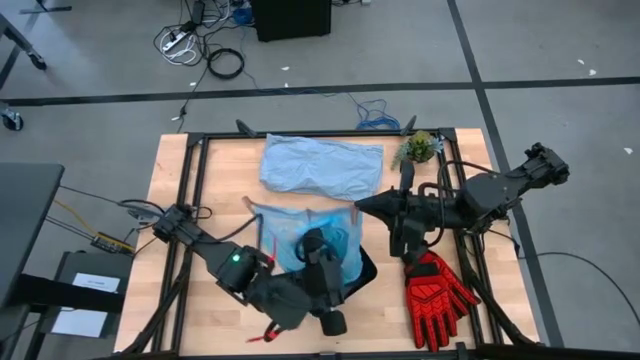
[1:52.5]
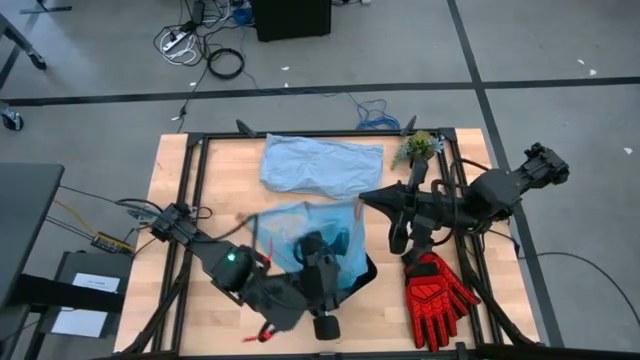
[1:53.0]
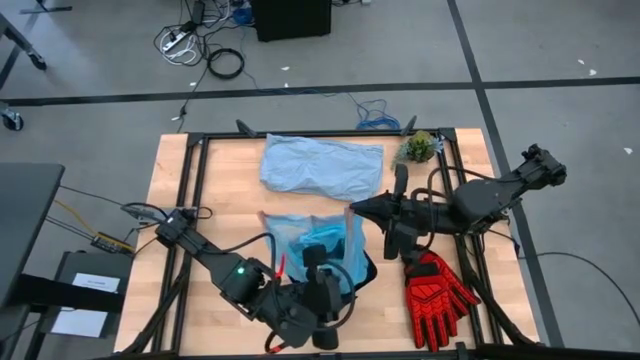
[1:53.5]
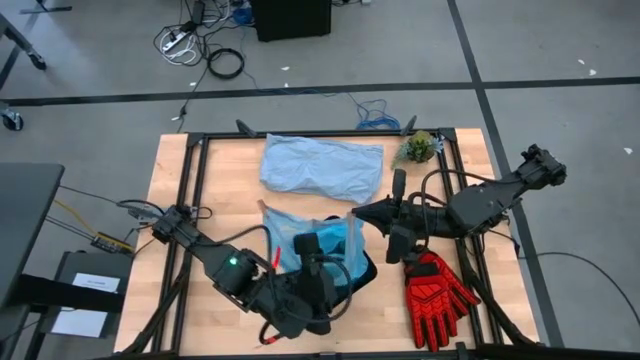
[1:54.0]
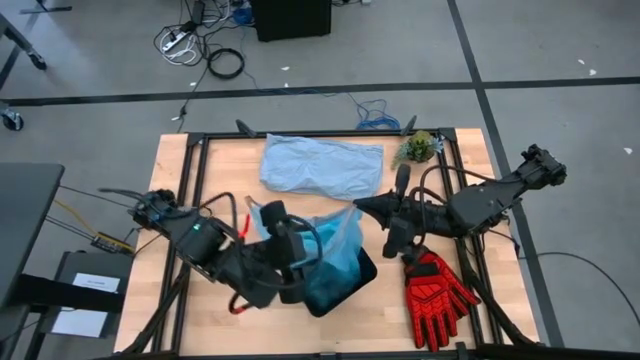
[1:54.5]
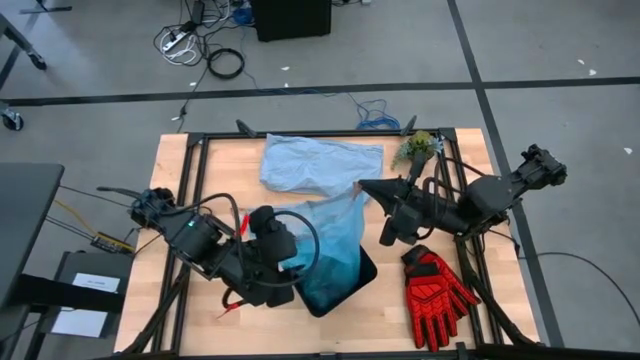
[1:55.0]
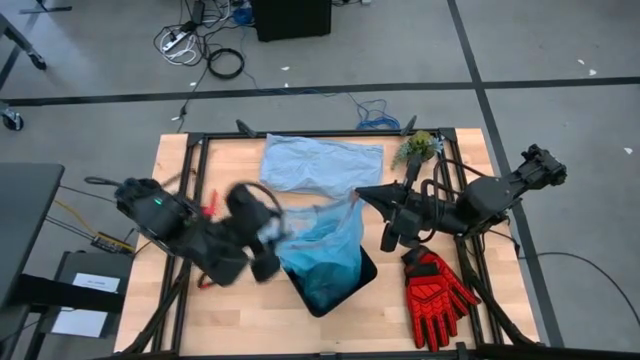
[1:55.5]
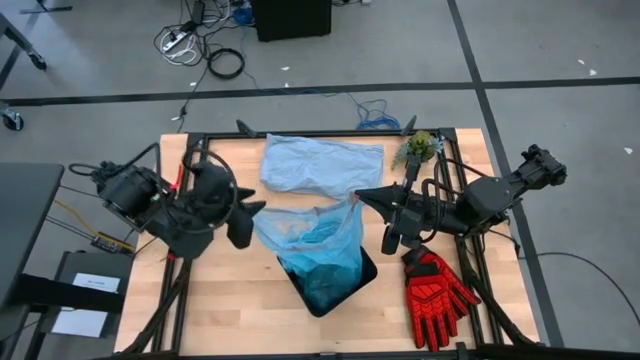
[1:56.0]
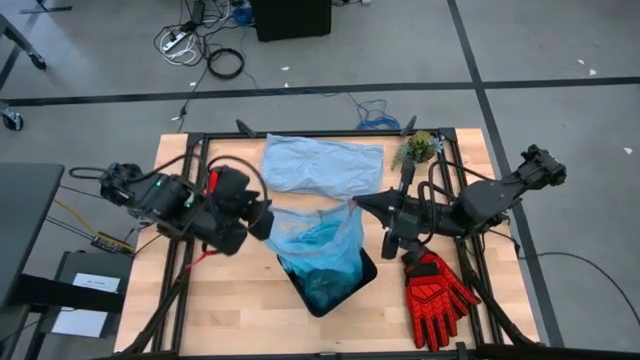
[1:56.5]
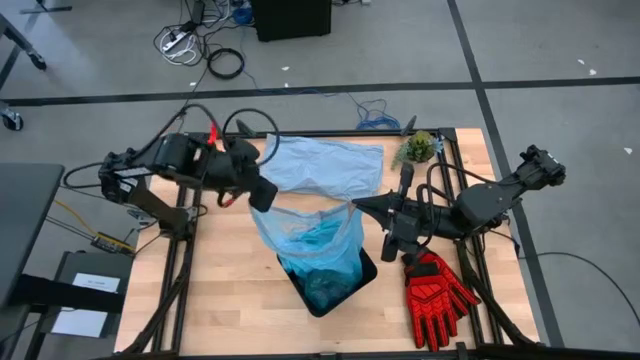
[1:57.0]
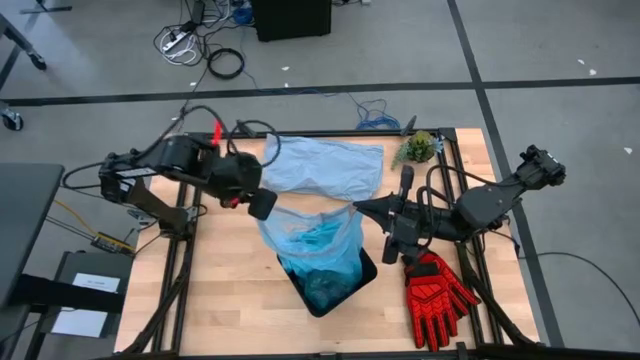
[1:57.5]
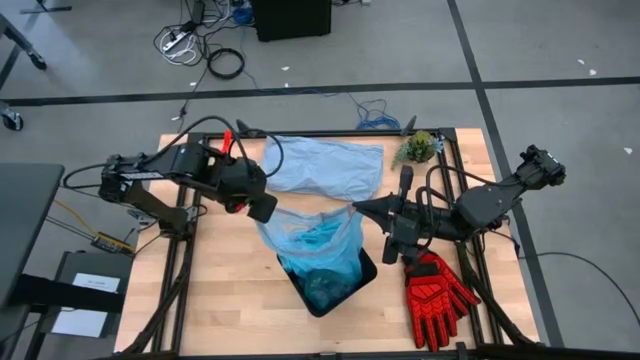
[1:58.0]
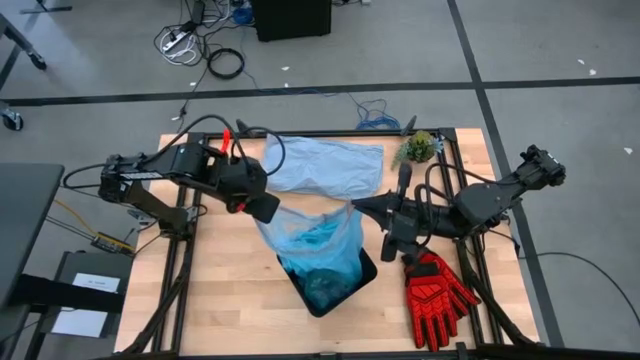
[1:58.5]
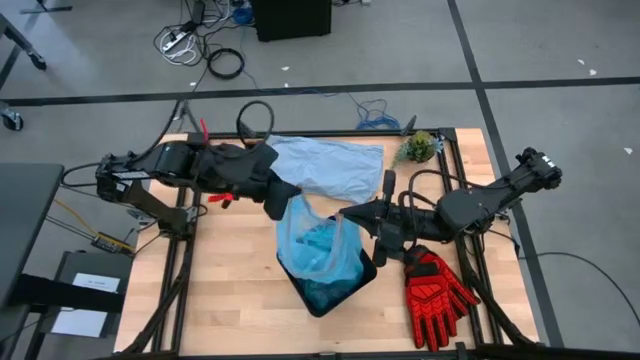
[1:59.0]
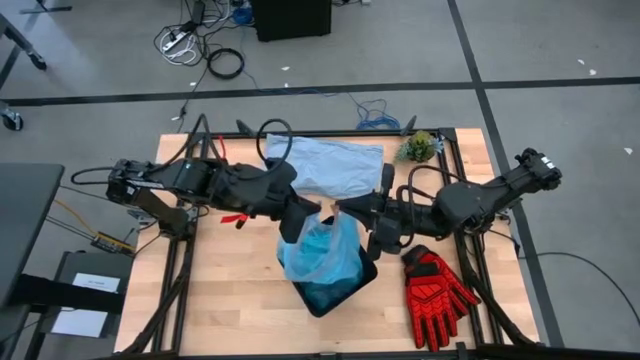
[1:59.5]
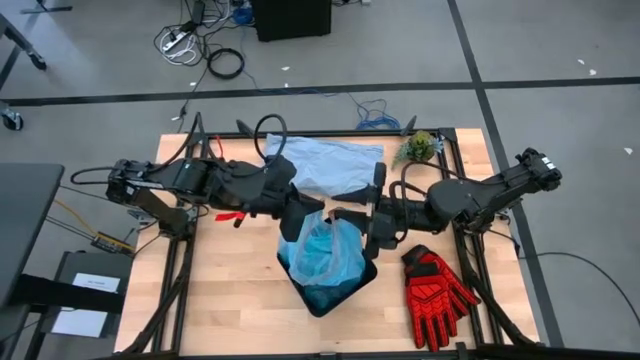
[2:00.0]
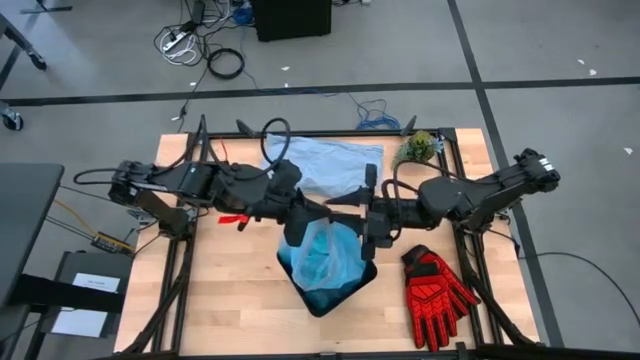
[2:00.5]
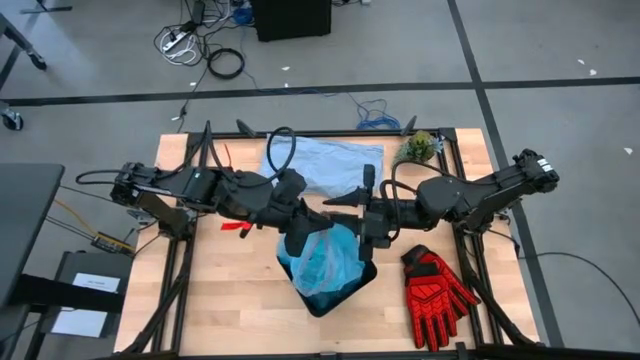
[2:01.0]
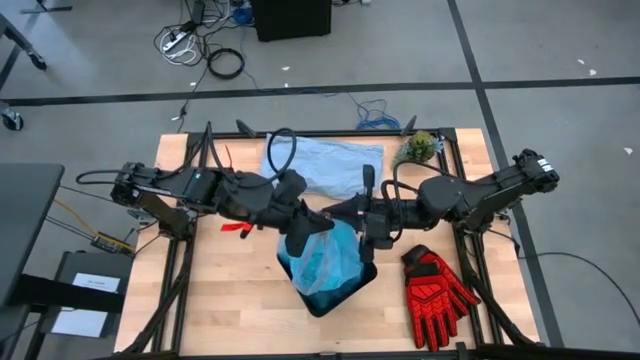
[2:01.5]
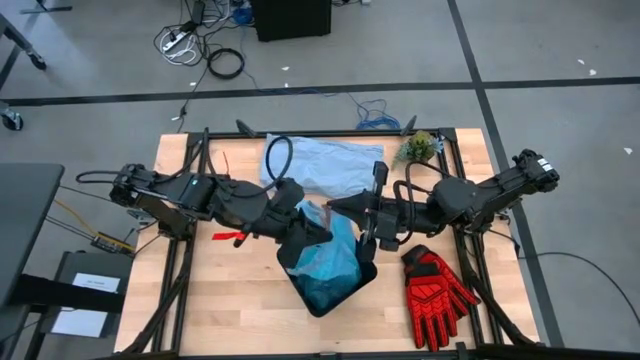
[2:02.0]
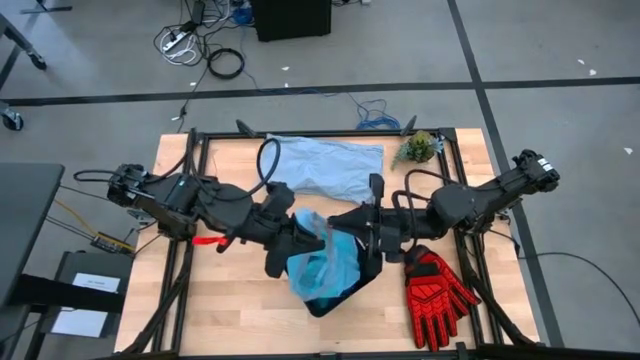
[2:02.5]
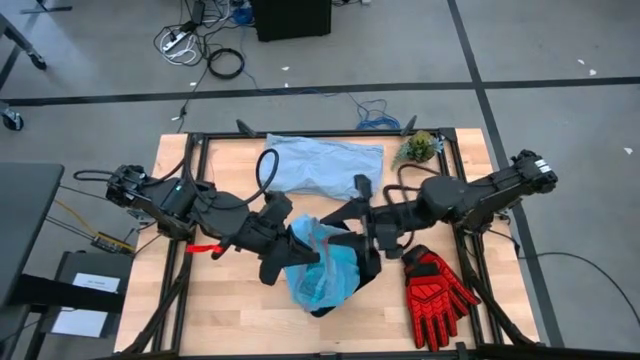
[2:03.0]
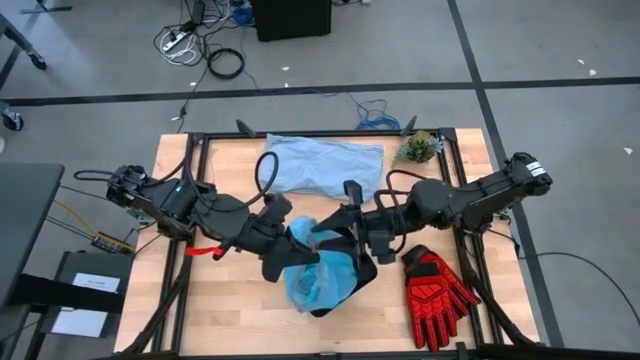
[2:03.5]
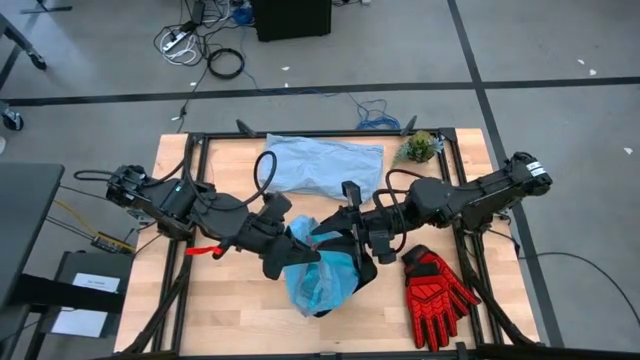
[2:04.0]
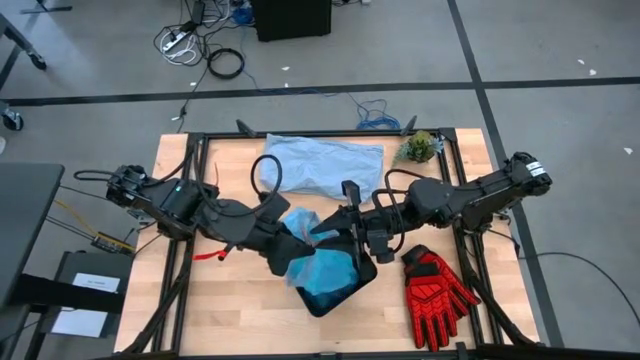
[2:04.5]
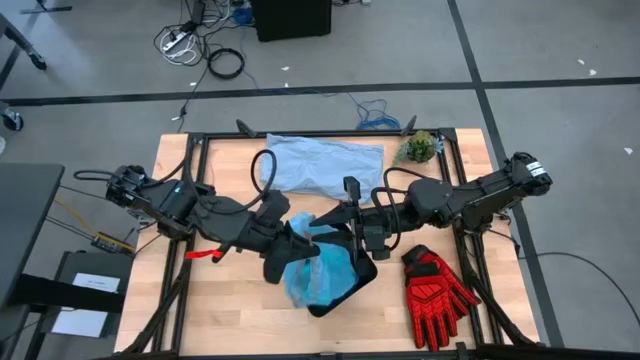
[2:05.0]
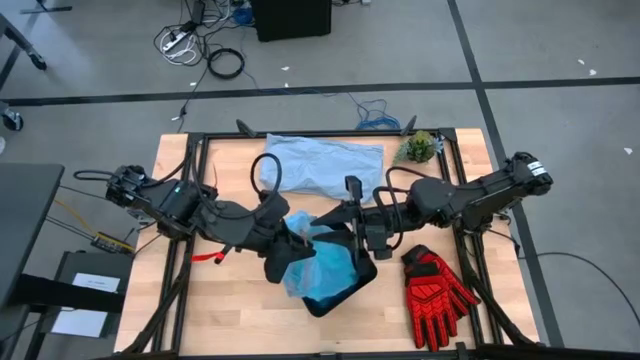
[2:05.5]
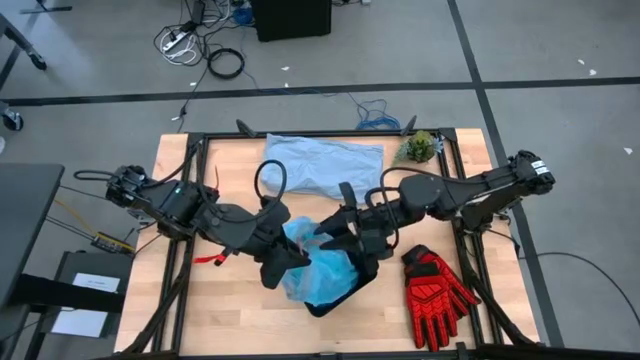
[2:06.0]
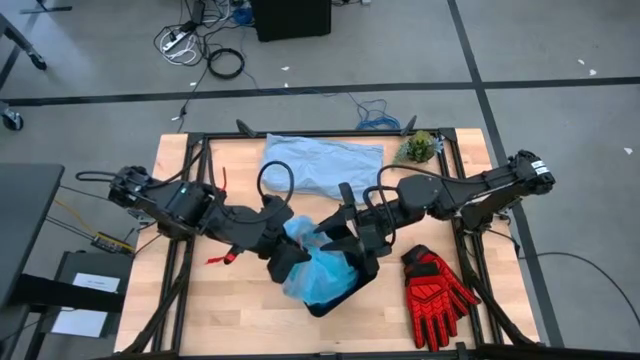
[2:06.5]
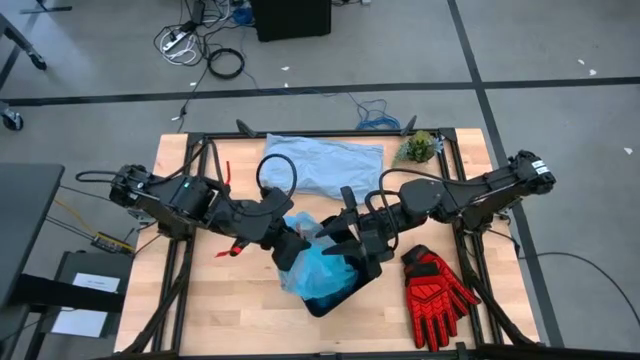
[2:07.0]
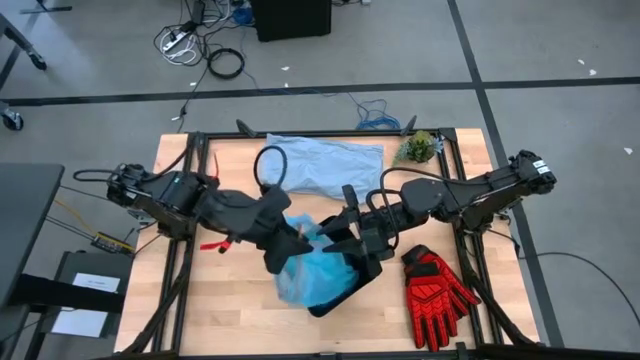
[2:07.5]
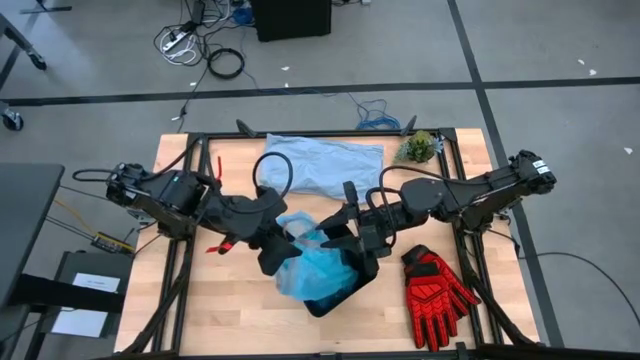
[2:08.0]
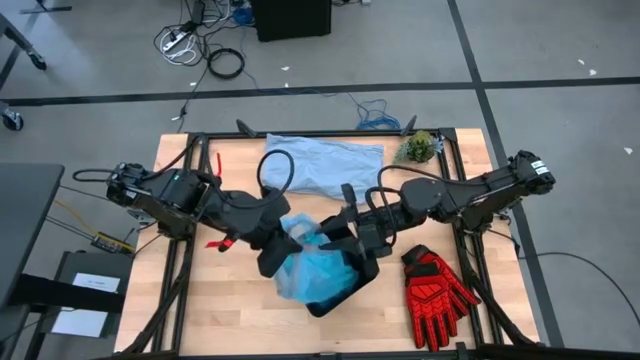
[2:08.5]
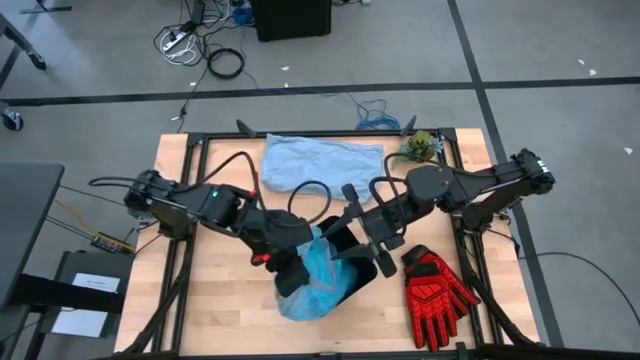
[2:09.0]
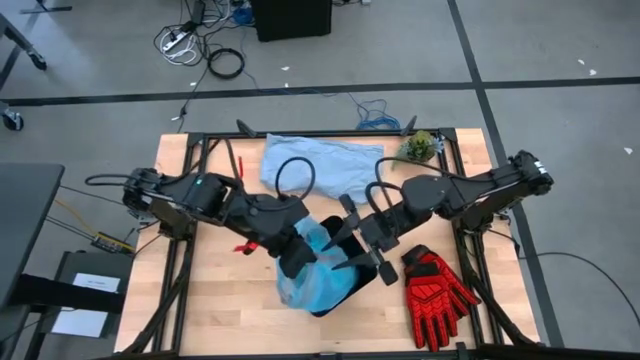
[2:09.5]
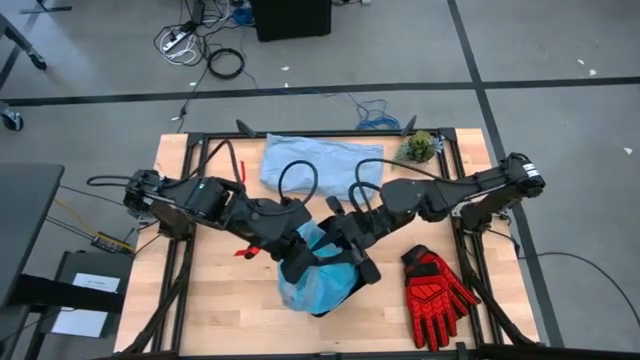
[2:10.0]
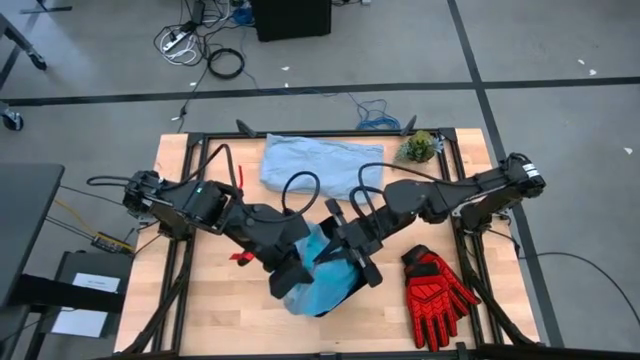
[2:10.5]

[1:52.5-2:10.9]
Task: place trash/remove bag and relplace
Close the light blue trash bag

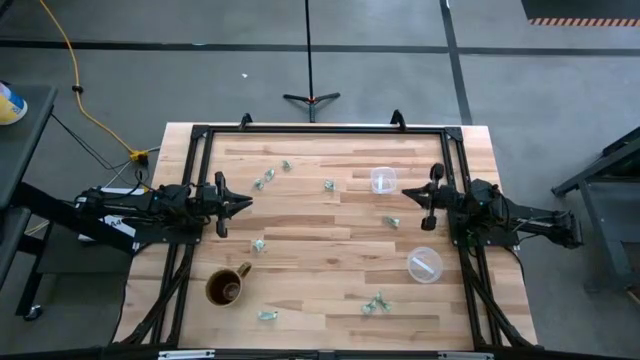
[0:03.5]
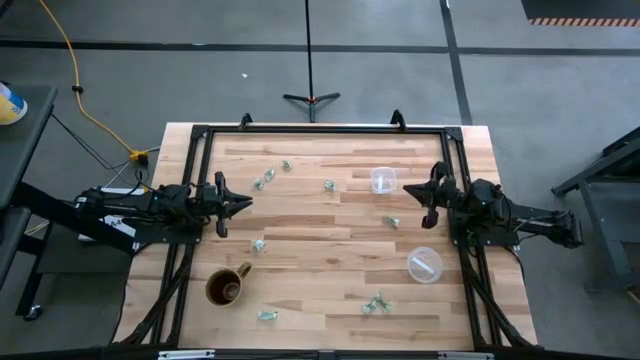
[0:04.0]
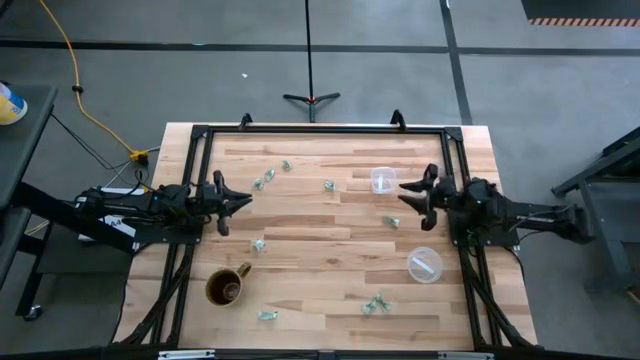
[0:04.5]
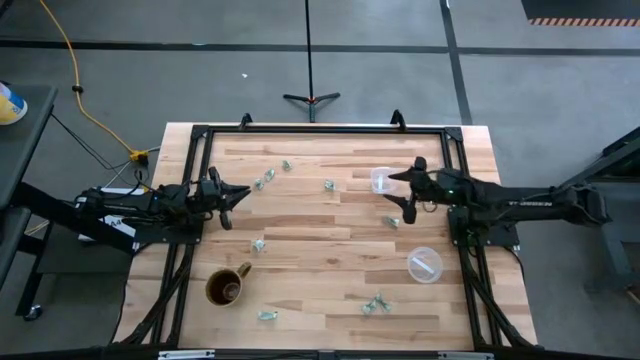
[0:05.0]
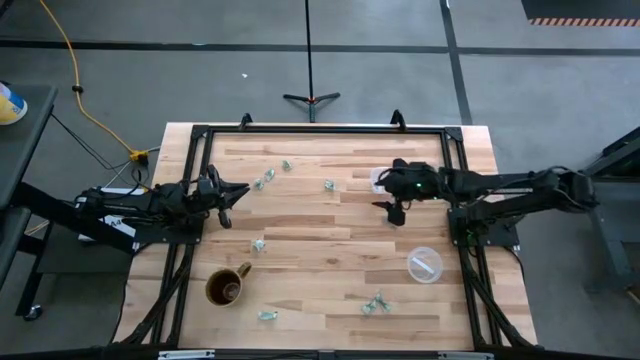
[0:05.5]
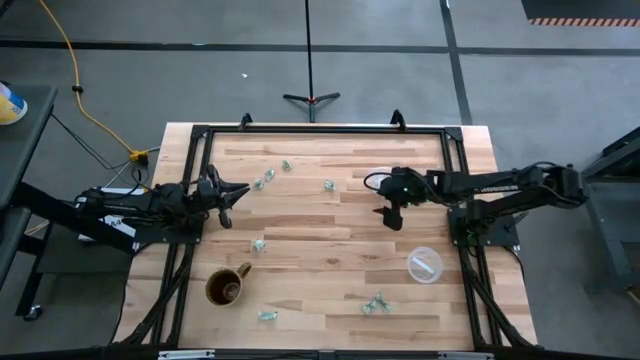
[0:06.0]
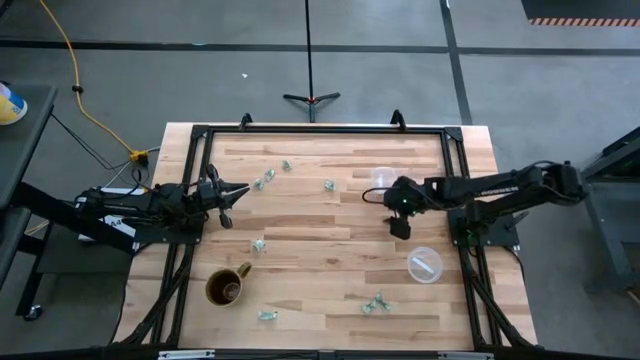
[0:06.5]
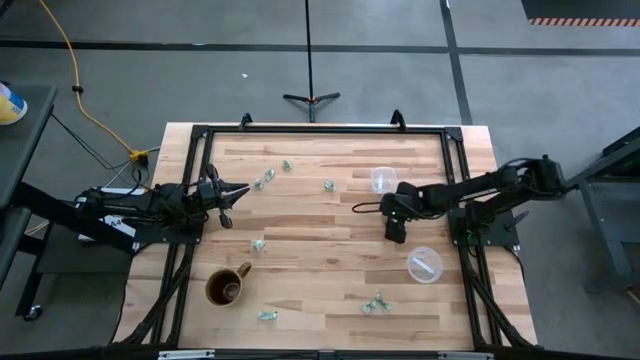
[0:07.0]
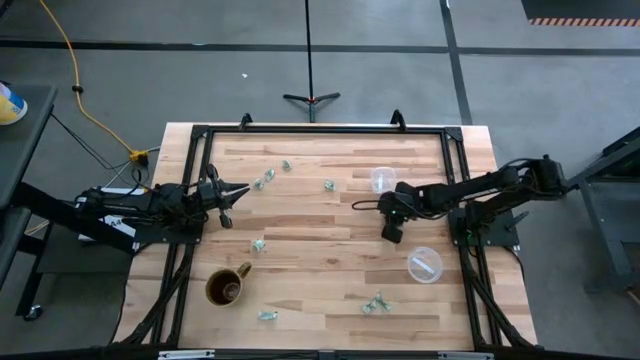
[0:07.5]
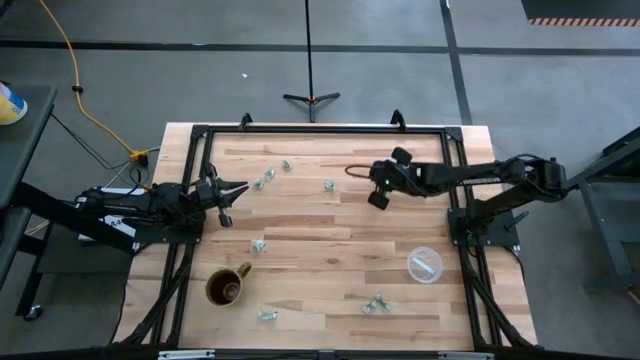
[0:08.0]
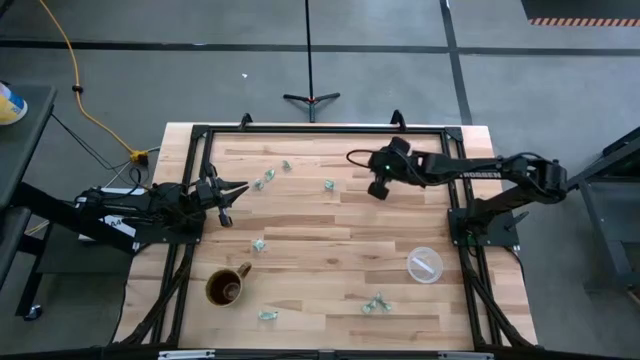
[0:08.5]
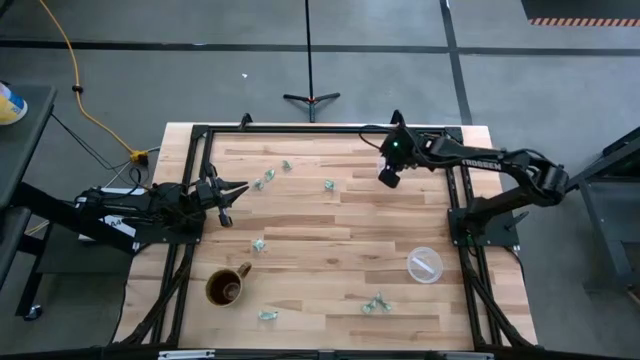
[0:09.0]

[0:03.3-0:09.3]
Task: Pick and place items into bin
Put the green stevia packet into the top transparent bin
